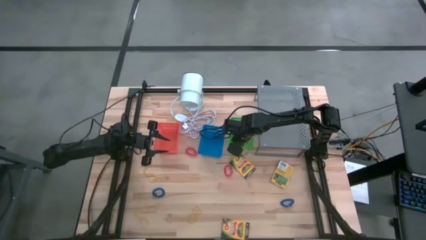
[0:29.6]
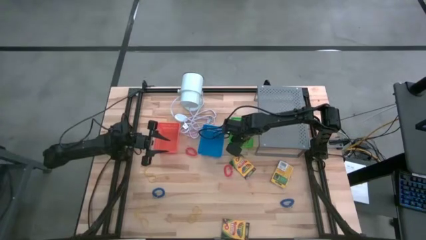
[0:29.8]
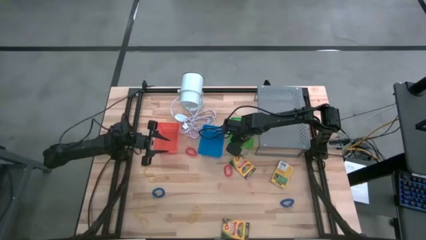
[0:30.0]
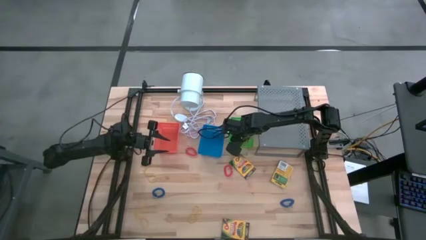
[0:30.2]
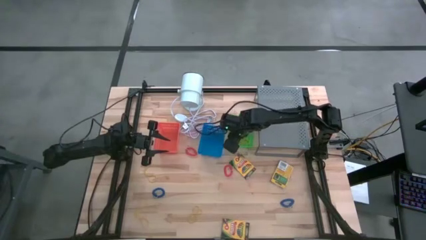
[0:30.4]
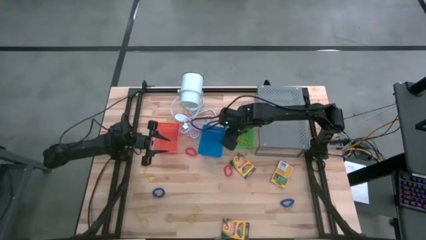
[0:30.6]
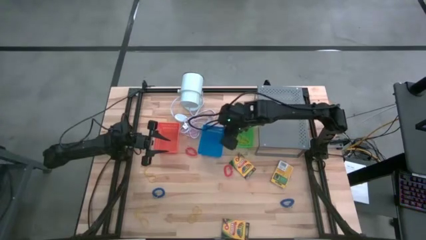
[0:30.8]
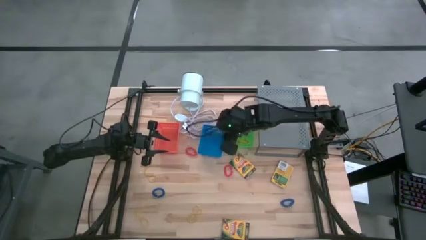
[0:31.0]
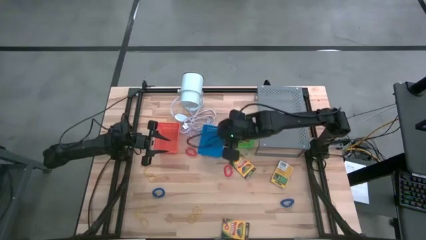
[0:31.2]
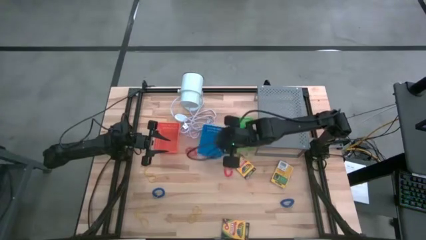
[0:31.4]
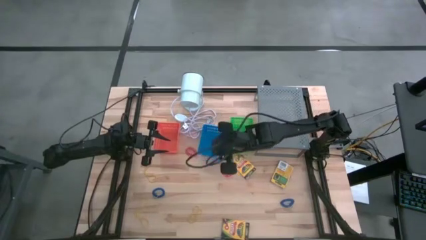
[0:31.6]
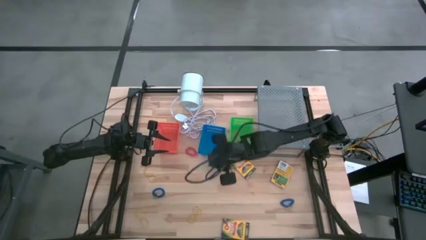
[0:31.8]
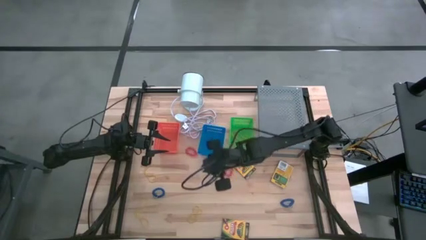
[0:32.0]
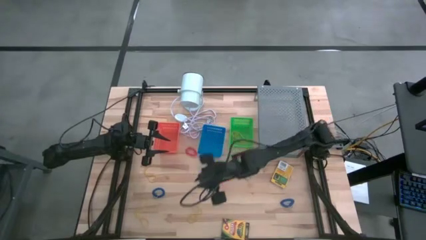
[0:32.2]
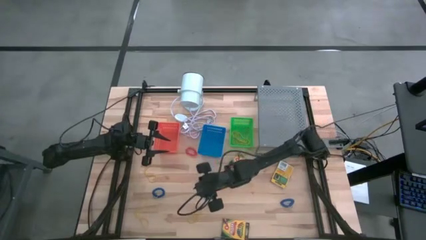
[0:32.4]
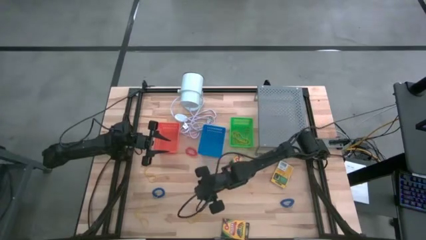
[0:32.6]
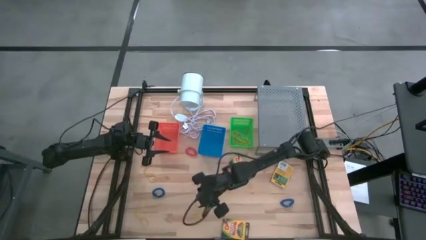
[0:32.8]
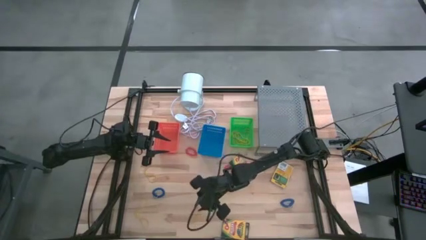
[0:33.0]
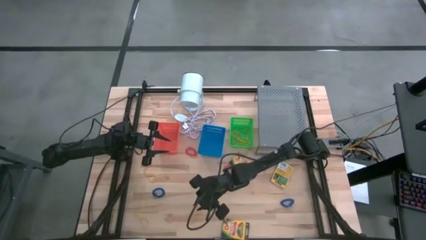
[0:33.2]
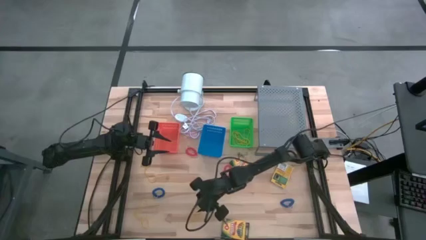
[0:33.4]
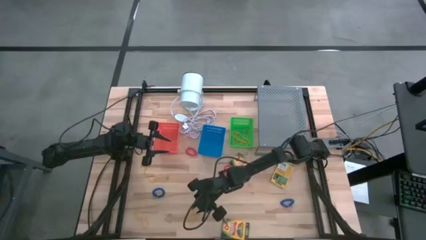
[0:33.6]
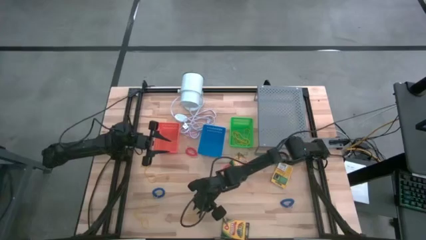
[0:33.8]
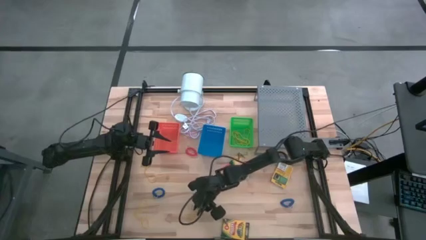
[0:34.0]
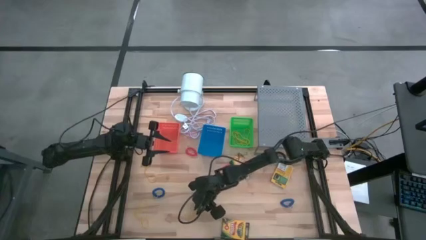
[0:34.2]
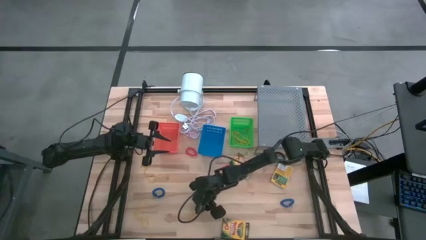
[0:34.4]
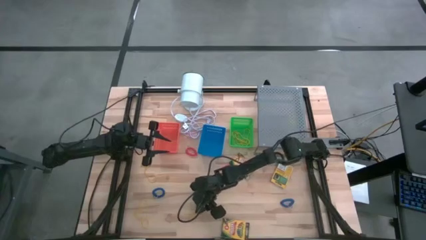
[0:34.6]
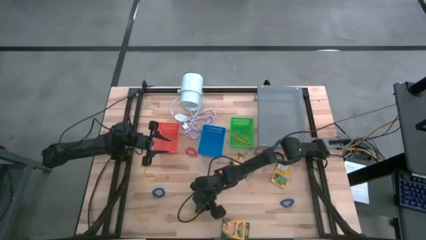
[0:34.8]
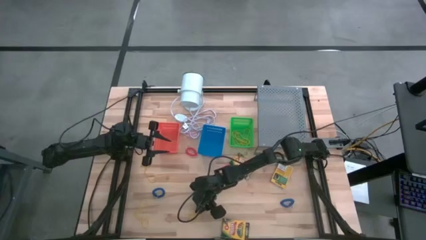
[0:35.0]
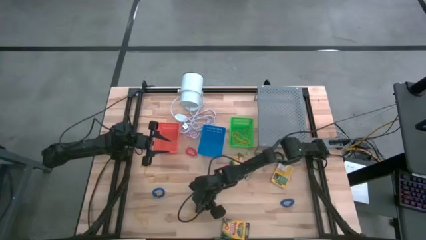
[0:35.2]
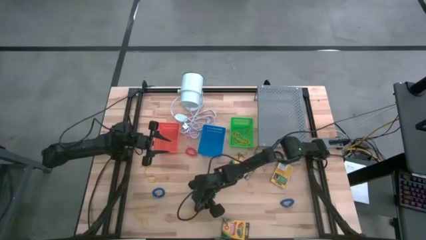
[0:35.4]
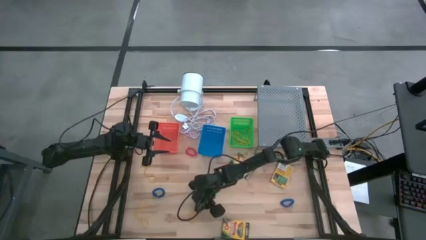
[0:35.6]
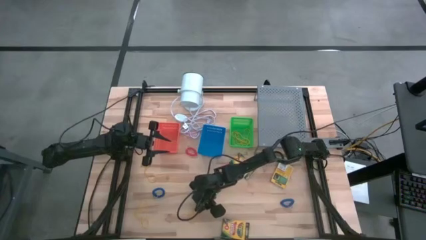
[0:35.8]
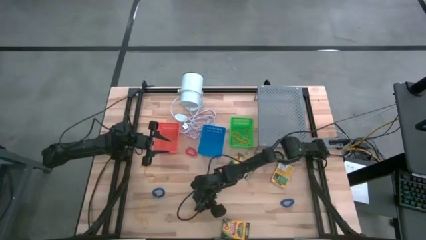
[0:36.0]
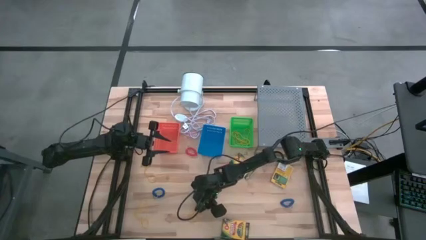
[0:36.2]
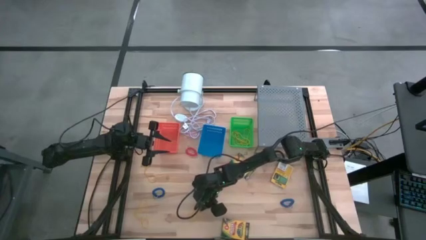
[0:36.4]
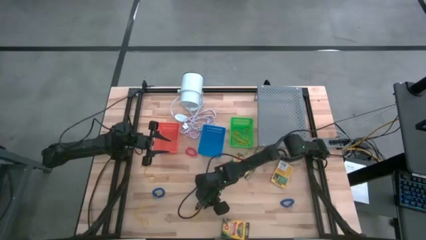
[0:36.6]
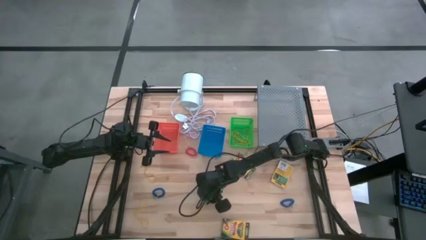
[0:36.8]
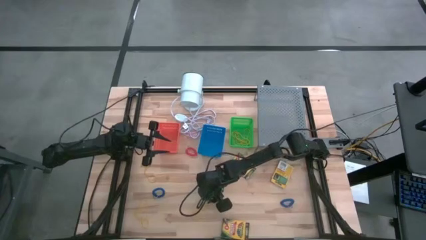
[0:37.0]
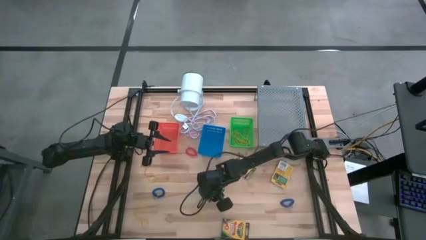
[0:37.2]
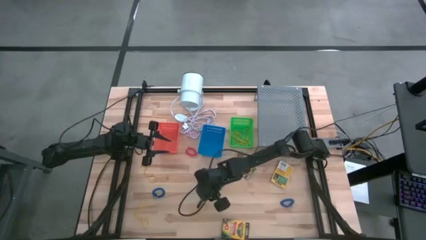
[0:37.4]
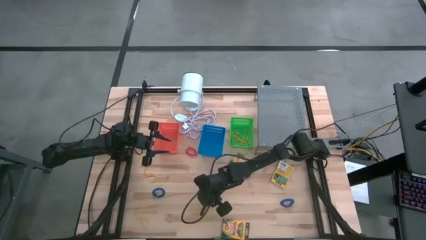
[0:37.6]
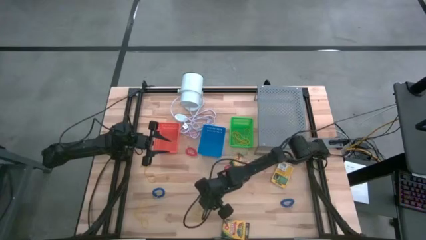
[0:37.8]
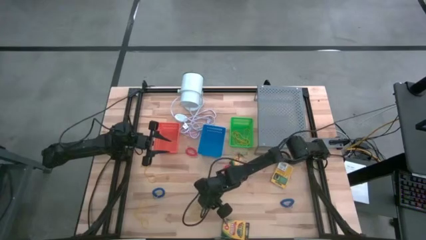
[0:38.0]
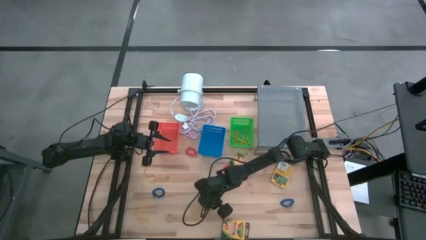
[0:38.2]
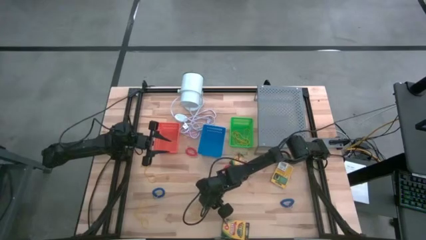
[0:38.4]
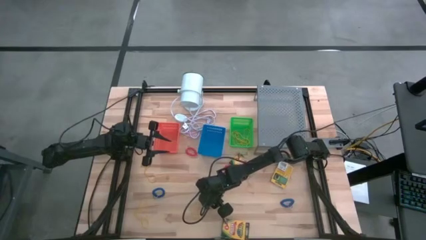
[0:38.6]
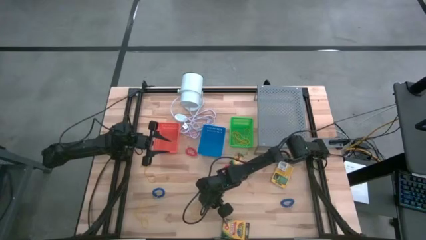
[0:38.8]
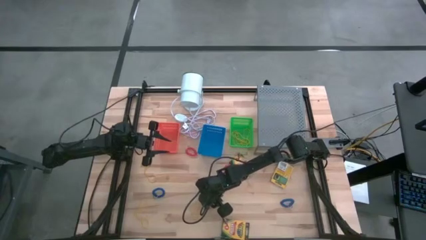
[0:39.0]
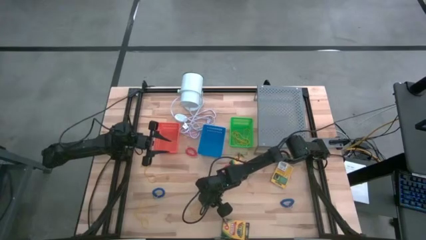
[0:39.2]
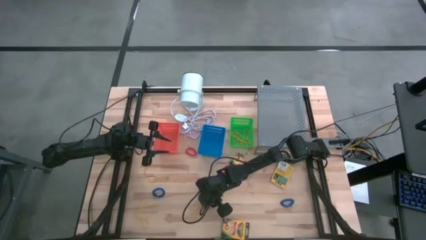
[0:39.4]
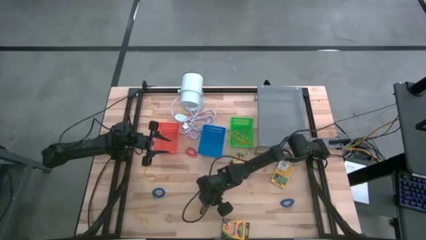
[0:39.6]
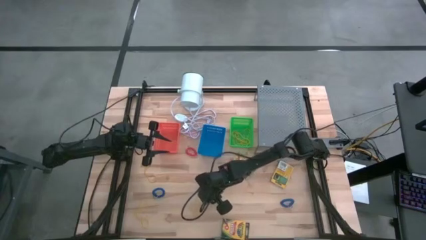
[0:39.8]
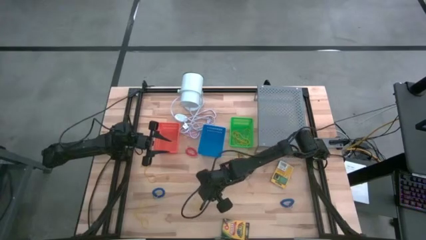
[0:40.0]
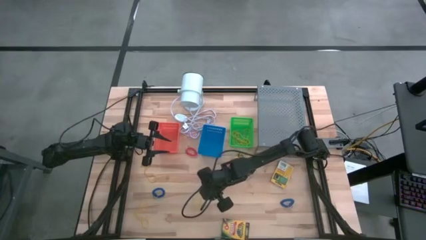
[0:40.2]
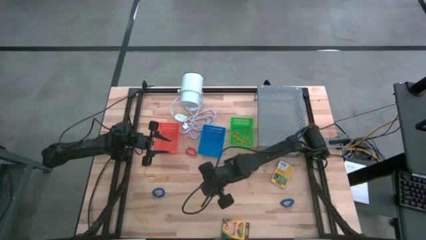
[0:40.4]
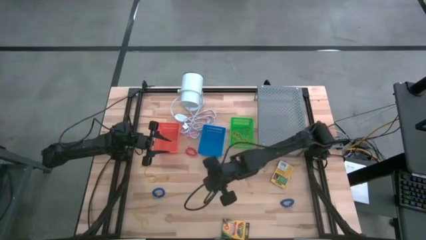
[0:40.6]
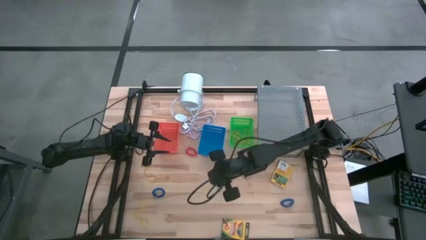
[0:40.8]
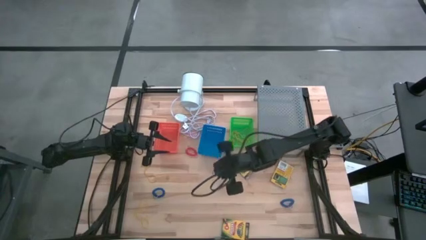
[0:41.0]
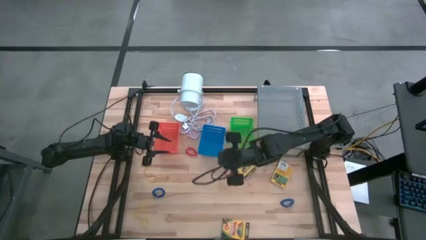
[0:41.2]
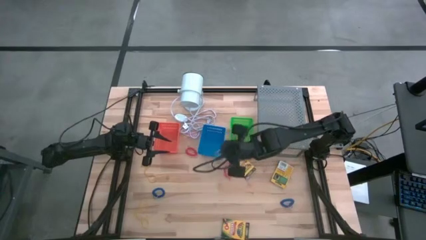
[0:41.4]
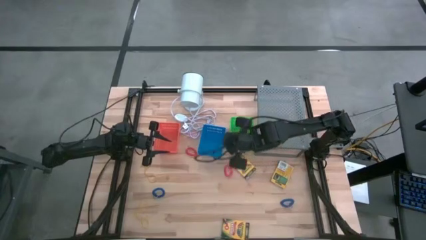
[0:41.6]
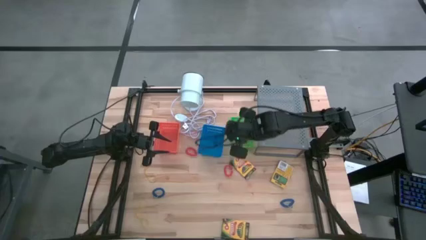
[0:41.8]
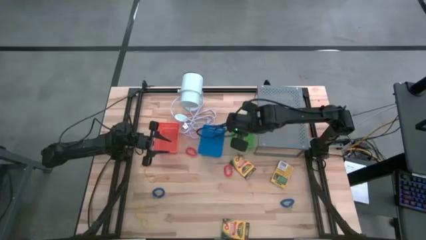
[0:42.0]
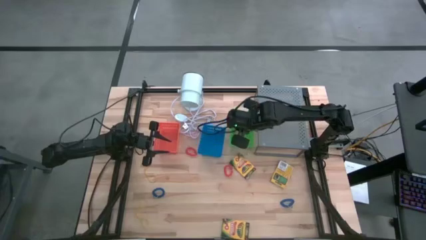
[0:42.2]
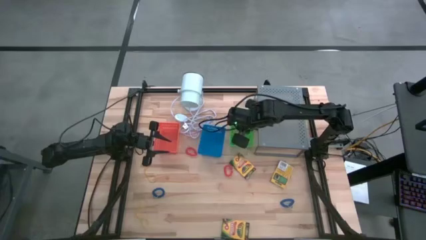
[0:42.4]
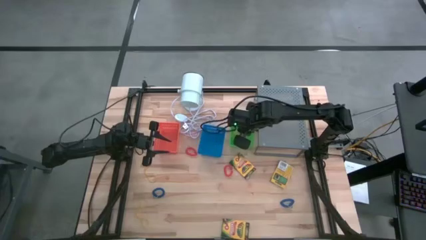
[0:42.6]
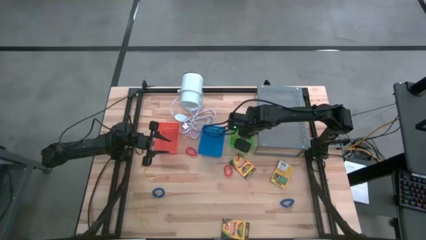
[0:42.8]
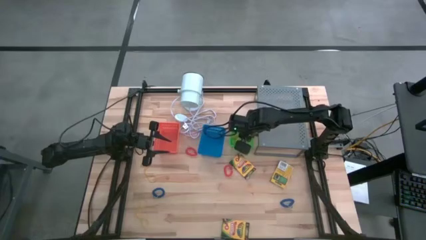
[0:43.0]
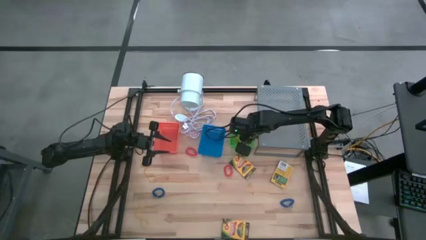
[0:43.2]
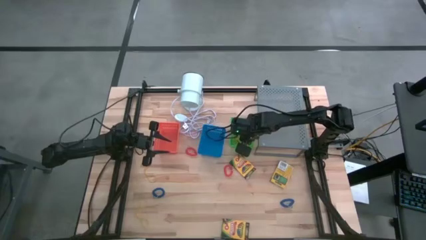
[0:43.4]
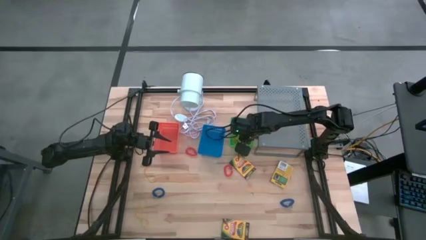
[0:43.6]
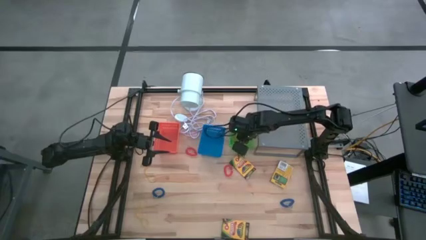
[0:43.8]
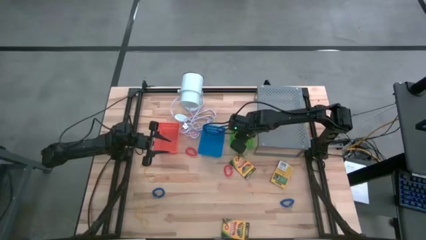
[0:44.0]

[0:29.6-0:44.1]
Task: Pick & Place Office Desk Supplies
Put the yellow rubber band into the green bin
